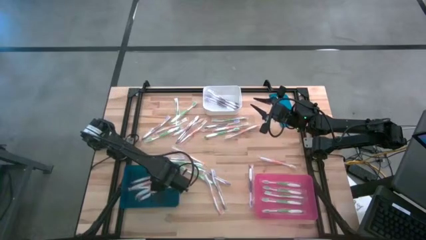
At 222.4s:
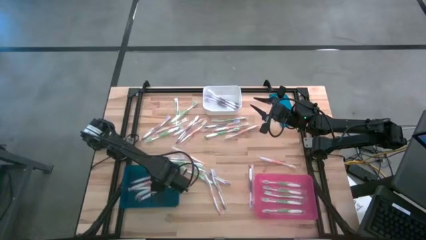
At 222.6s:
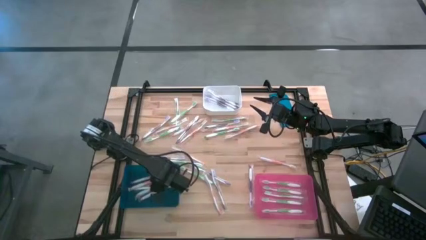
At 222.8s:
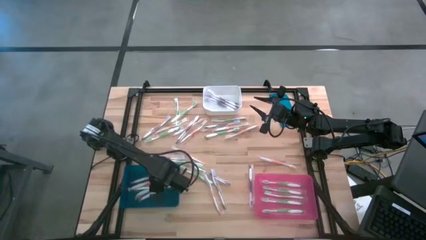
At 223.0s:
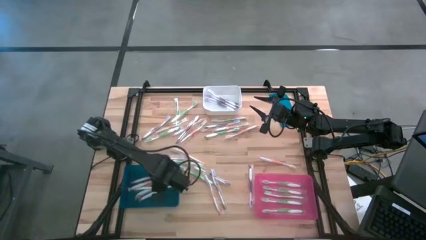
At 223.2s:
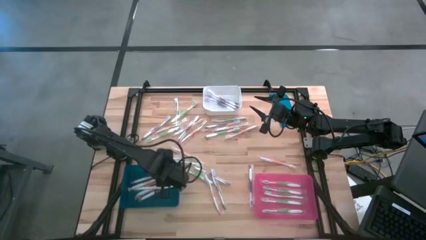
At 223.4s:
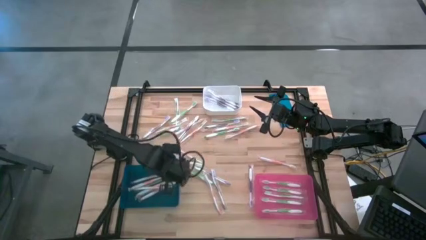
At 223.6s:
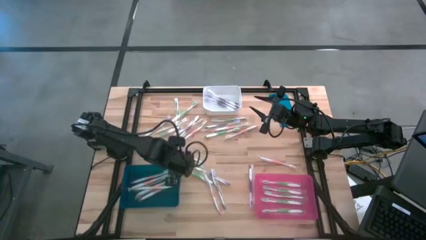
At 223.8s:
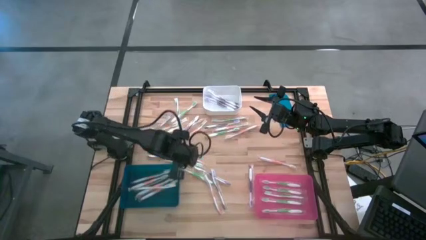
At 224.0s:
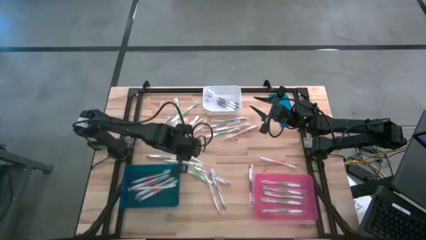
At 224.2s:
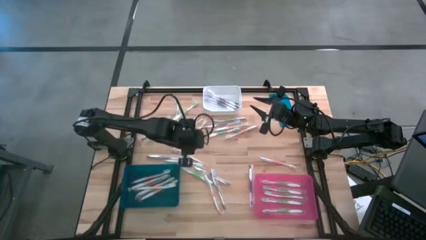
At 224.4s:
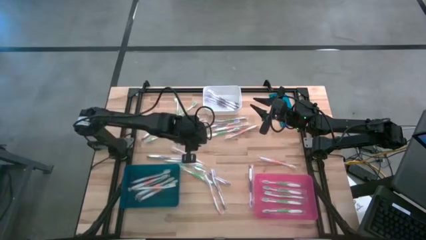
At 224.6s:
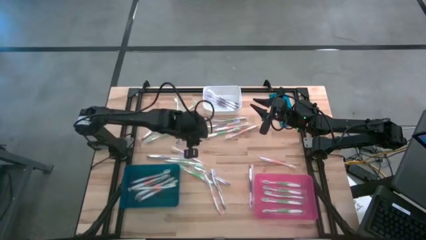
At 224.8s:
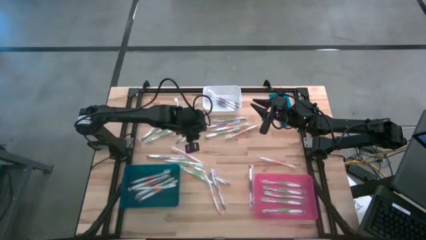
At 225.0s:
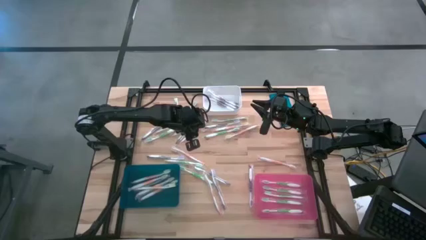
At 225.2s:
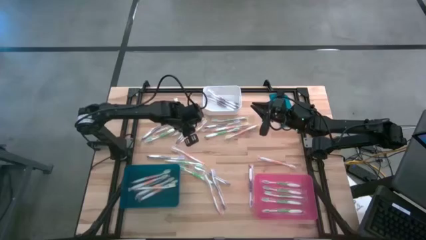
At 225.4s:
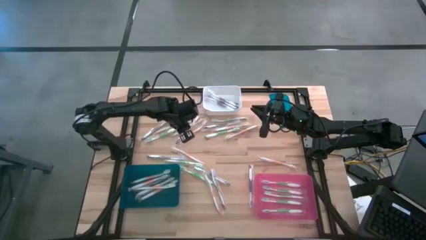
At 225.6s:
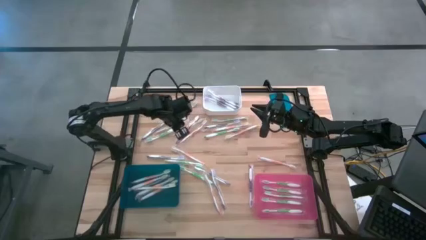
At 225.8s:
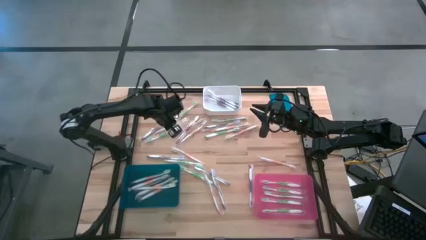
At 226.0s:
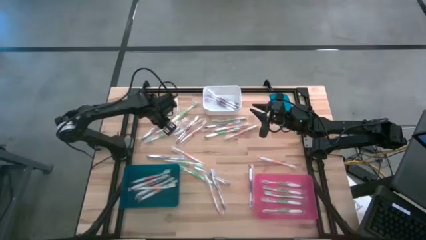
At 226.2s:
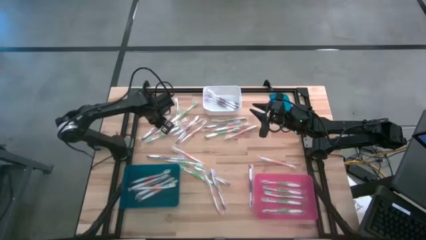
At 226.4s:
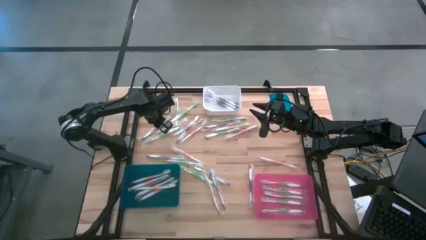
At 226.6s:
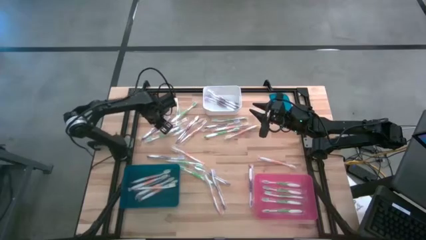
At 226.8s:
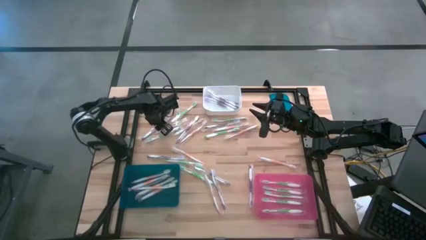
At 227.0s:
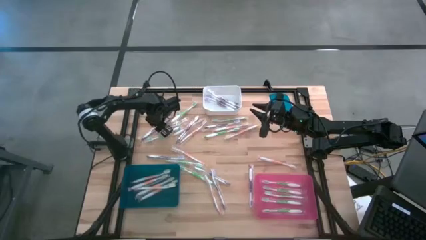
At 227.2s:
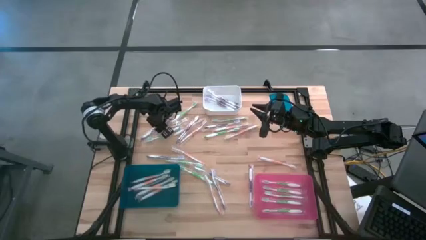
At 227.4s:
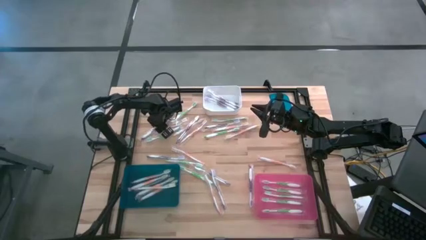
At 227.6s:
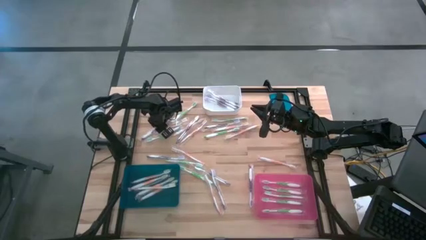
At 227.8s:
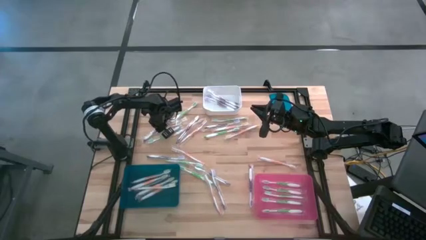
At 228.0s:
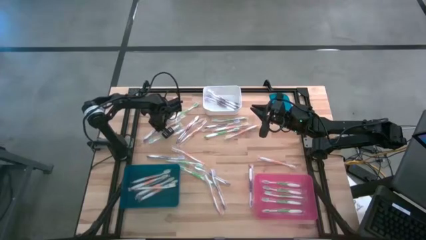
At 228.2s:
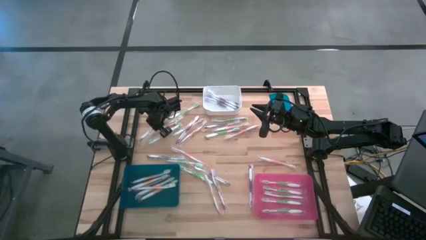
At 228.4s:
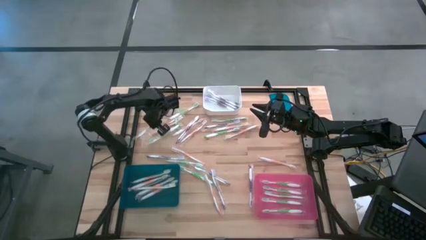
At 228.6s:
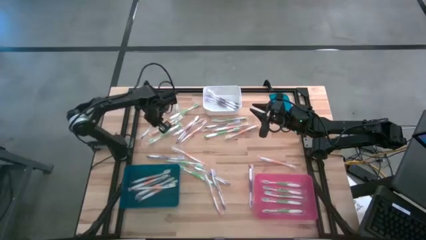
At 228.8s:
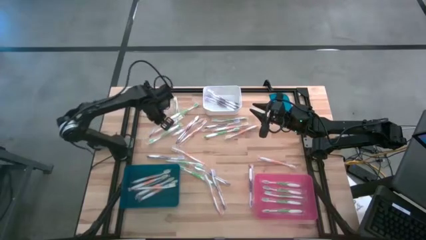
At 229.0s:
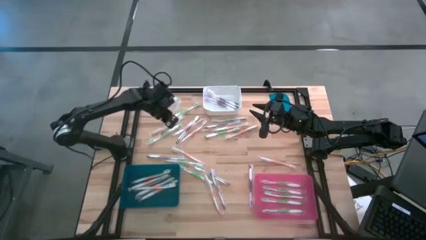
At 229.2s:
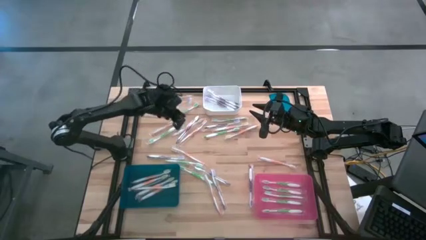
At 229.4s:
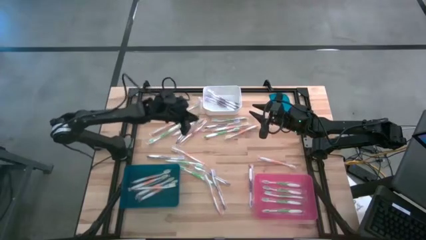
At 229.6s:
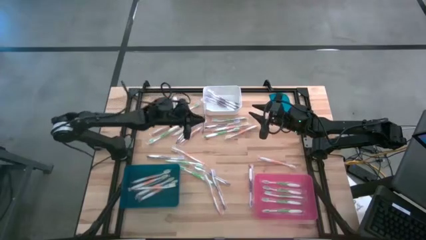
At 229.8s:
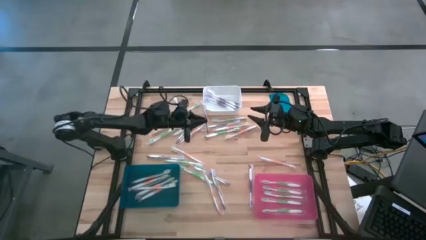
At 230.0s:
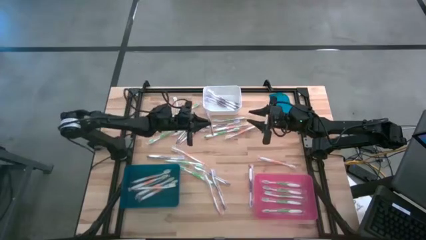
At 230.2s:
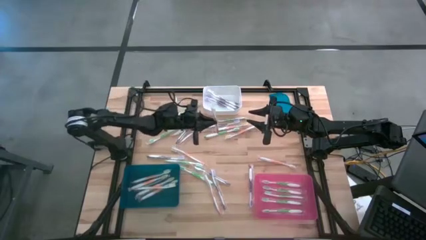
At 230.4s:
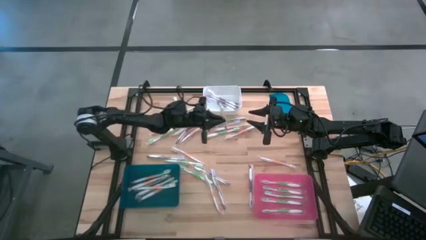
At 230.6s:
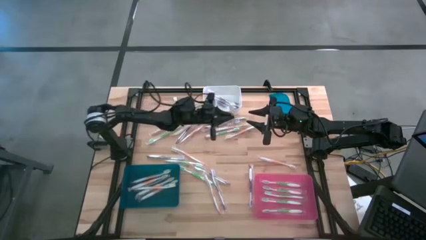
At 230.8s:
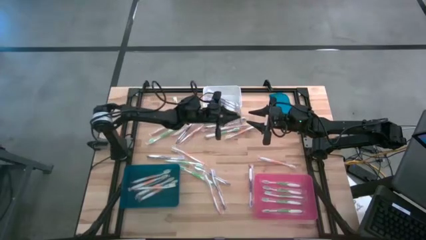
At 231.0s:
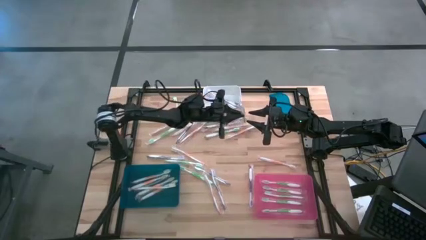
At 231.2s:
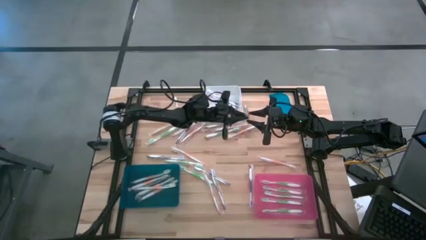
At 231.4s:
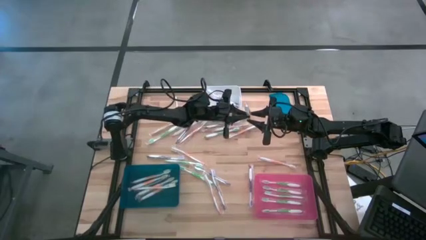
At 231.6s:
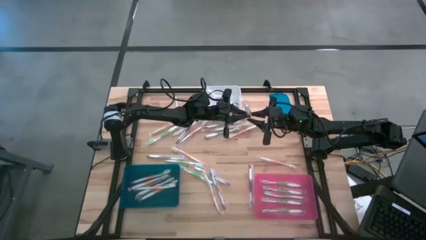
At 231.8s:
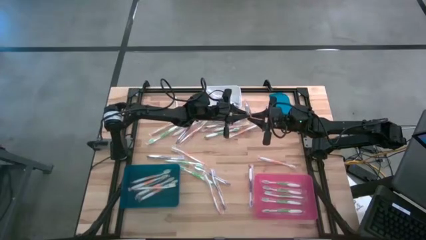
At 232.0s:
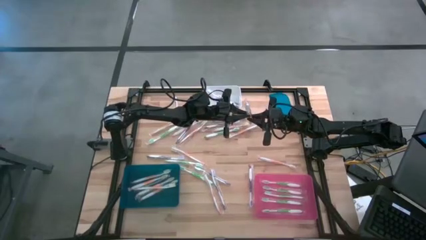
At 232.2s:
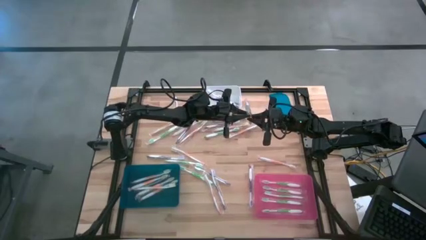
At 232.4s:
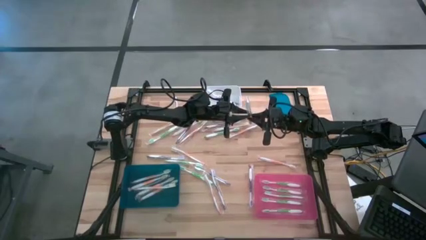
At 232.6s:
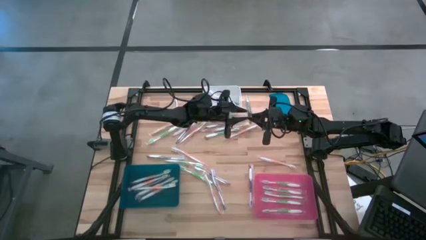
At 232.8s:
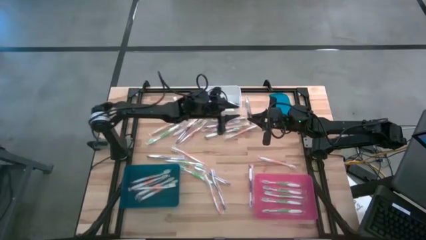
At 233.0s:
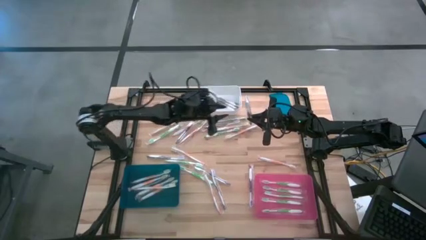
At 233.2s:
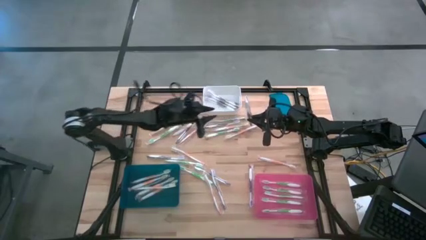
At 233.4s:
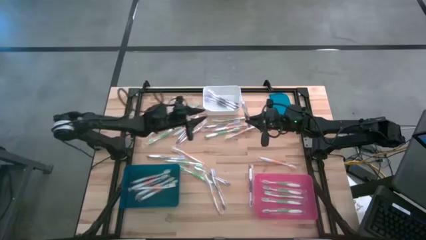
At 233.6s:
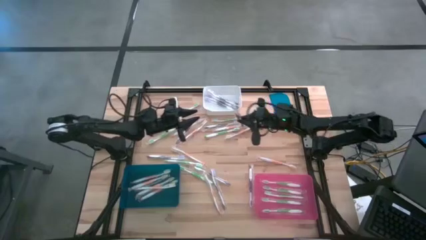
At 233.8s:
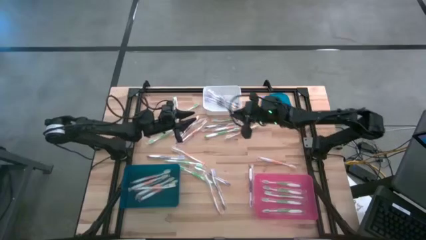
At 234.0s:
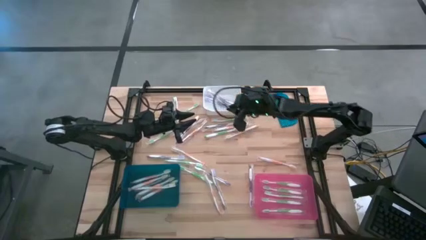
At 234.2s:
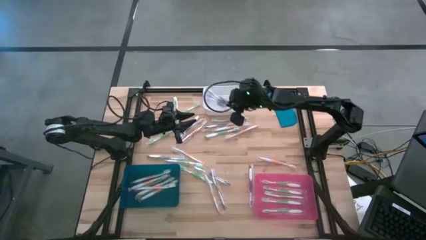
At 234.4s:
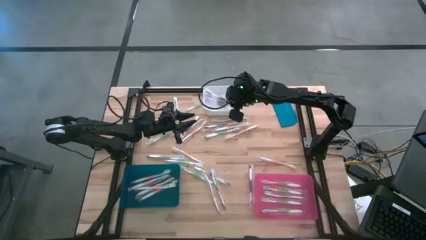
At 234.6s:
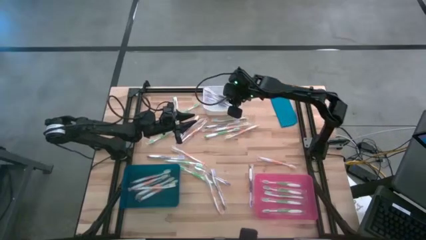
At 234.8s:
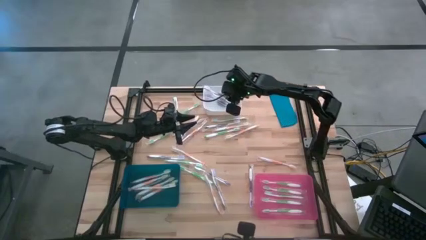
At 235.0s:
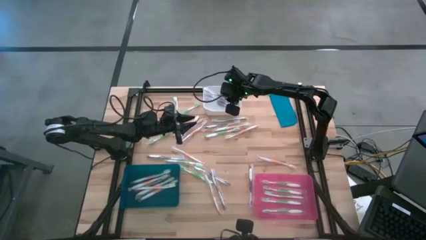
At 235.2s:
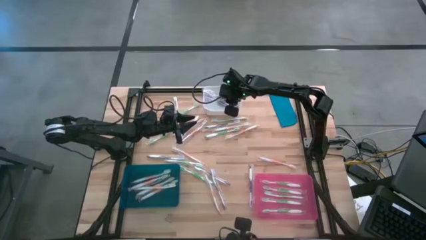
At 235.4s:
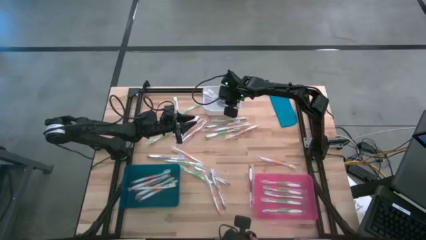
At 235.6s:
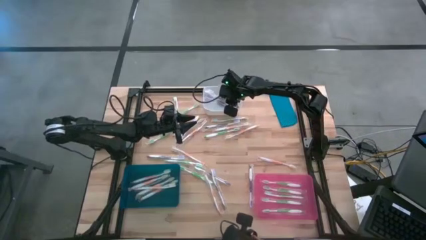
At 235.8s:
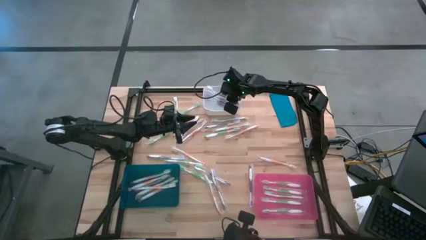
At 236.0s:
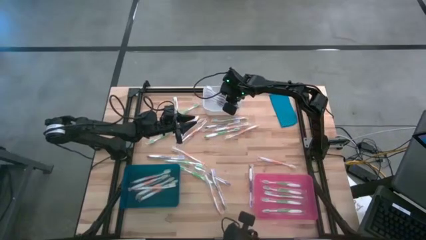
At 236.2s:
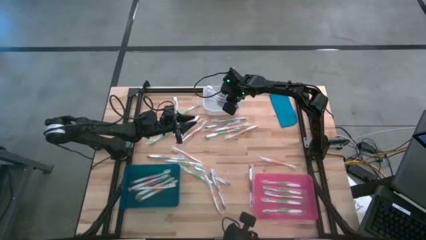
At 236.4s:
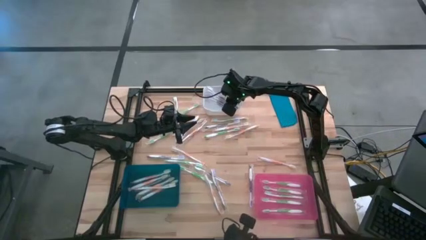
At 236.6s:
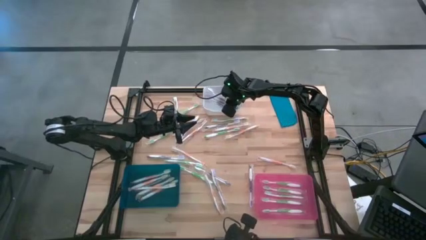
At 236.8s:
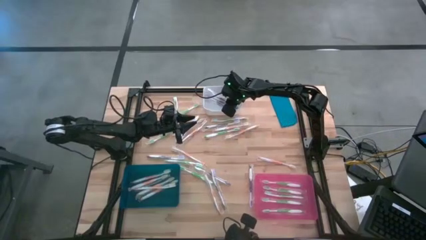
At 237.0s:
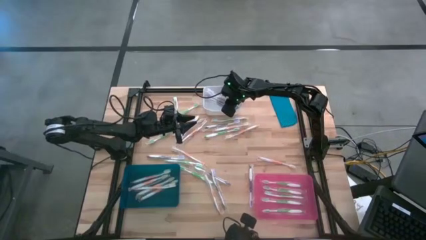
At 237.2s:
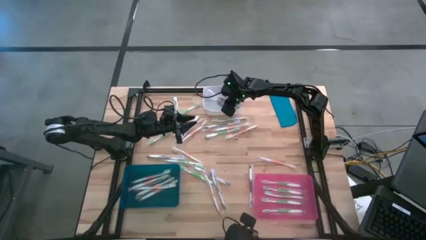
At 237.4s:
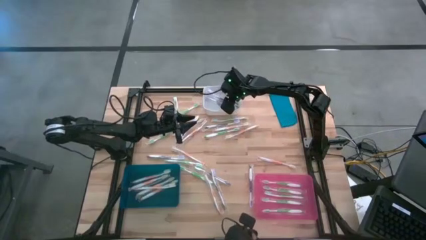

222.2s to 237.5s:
Task: Pick & Place Toothbrushes
Put the violet toothbrush into the white bin
